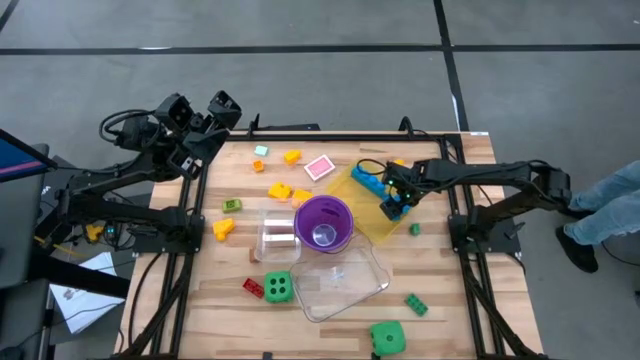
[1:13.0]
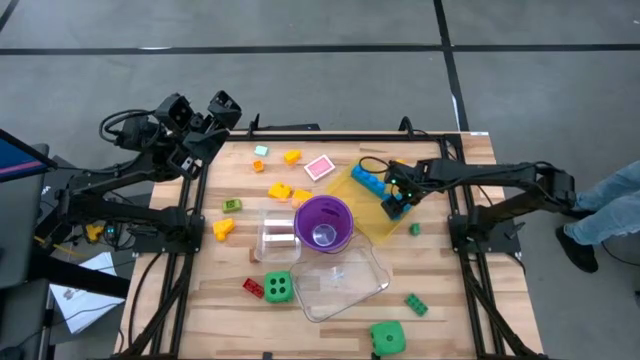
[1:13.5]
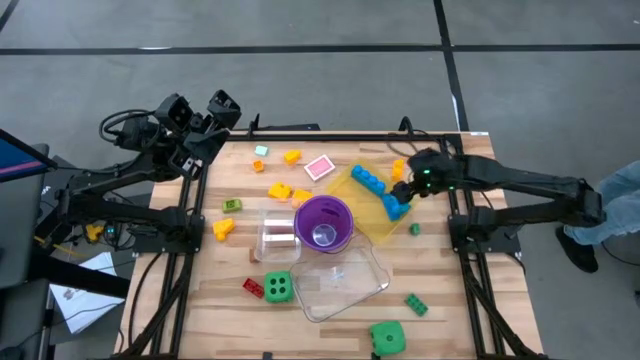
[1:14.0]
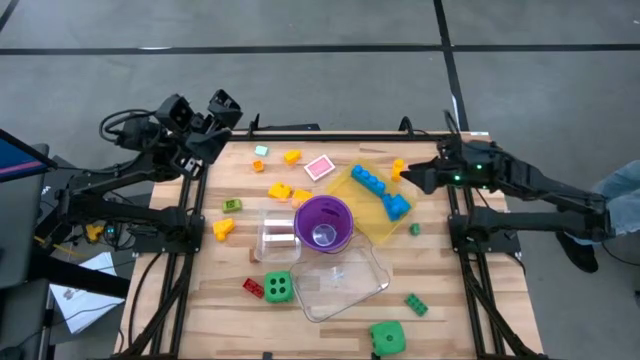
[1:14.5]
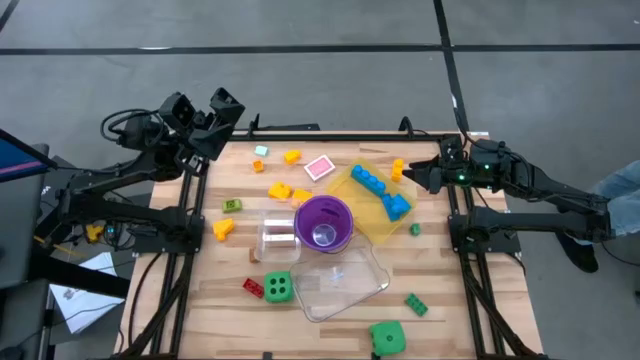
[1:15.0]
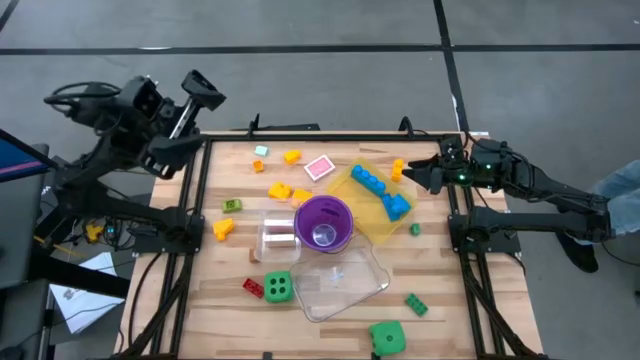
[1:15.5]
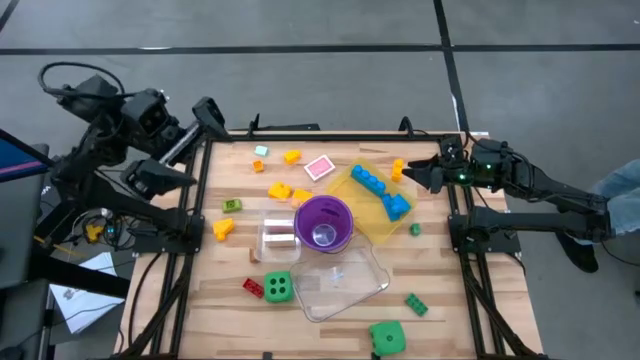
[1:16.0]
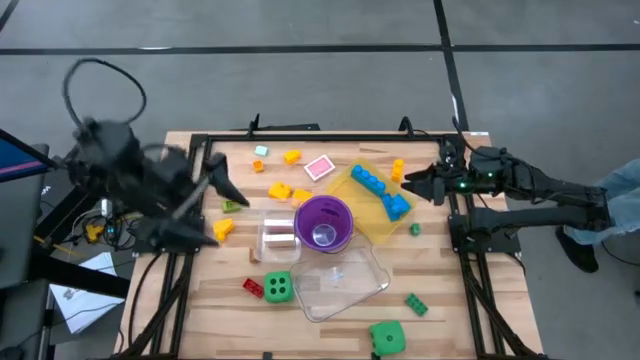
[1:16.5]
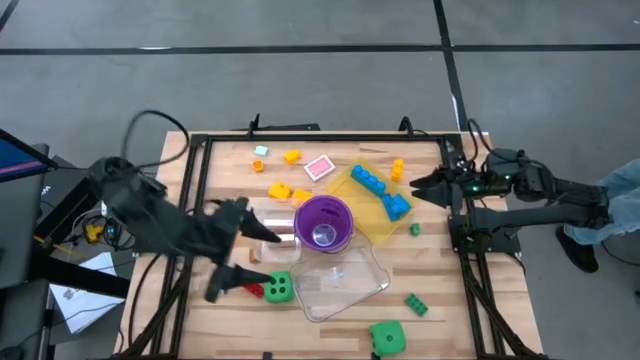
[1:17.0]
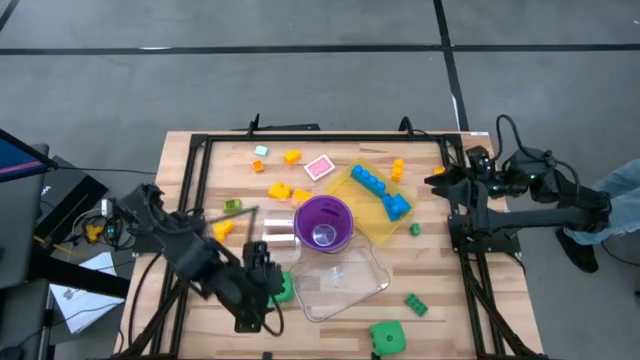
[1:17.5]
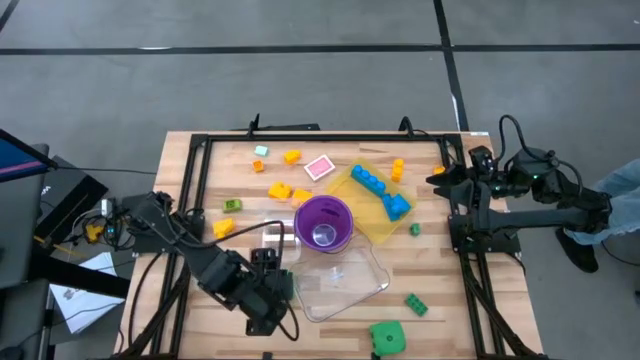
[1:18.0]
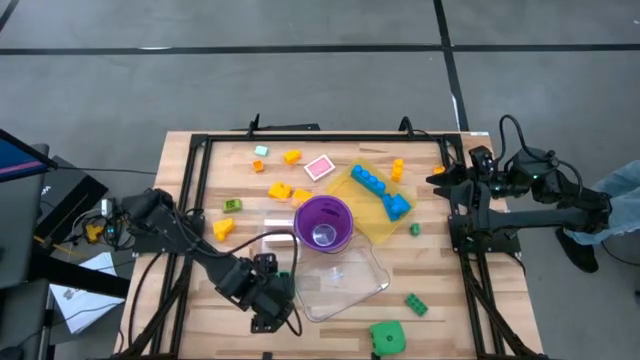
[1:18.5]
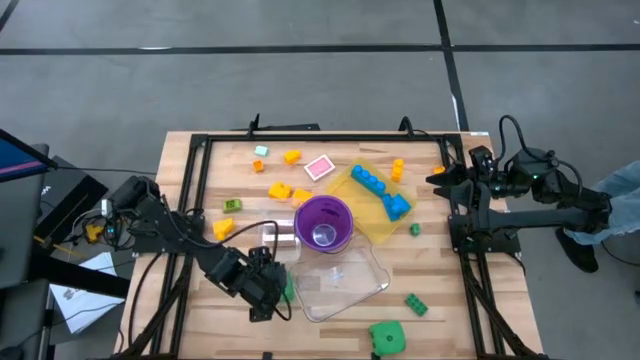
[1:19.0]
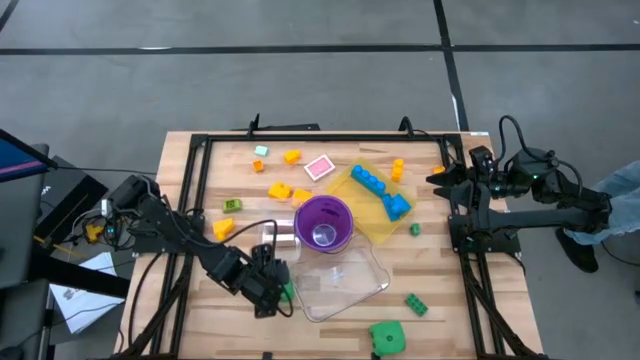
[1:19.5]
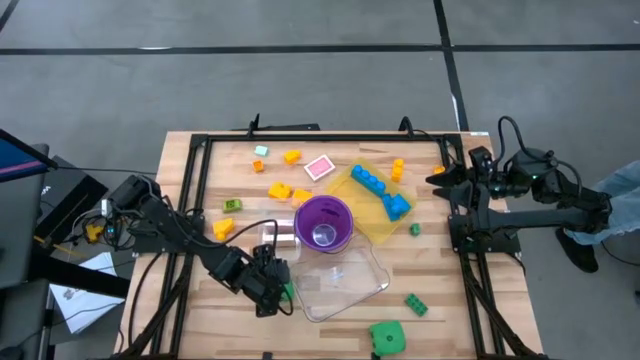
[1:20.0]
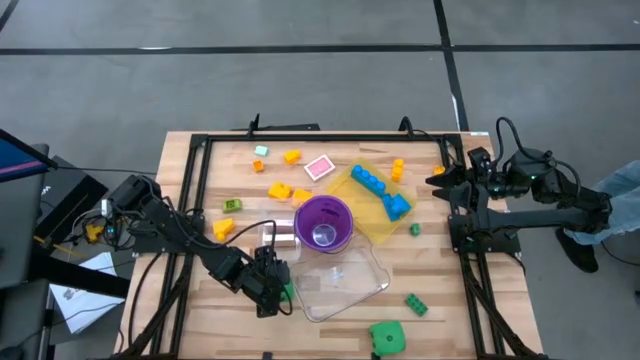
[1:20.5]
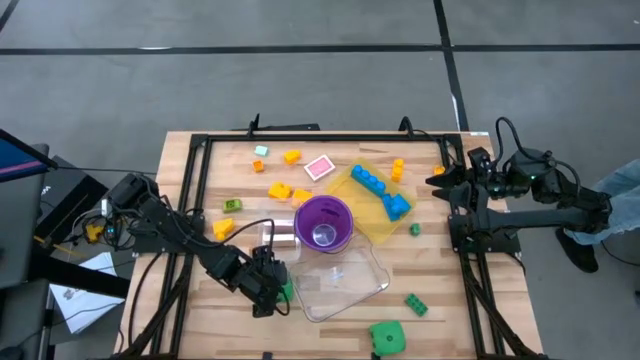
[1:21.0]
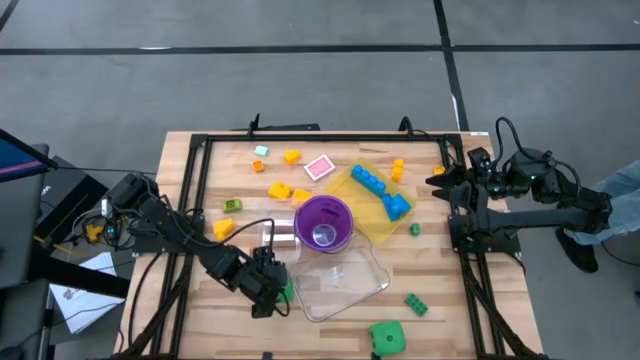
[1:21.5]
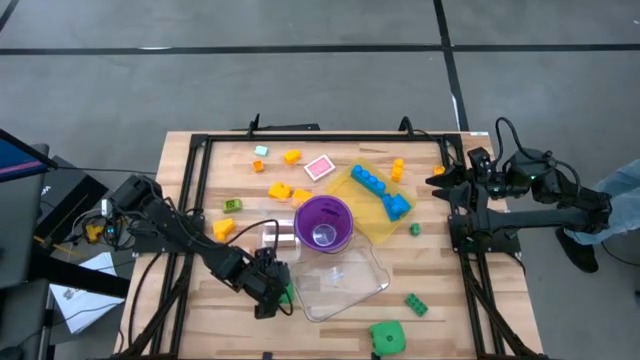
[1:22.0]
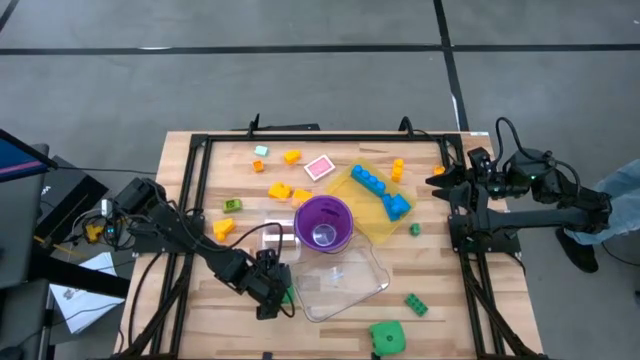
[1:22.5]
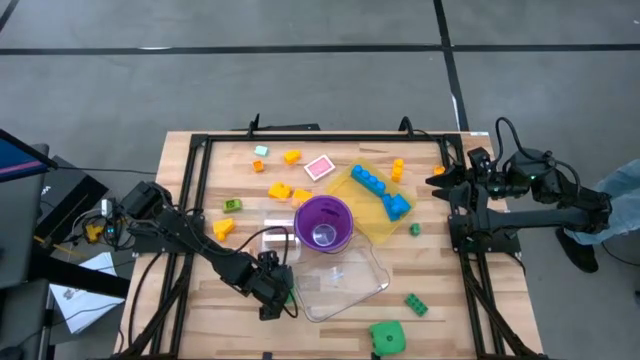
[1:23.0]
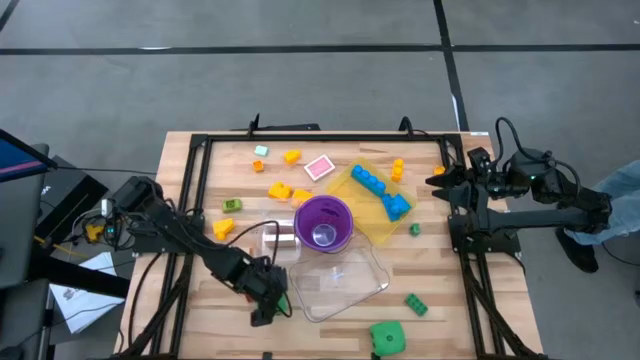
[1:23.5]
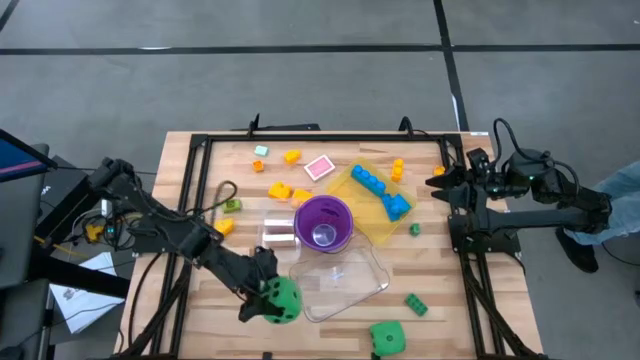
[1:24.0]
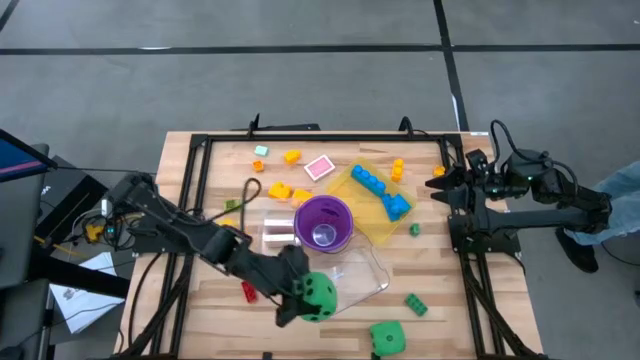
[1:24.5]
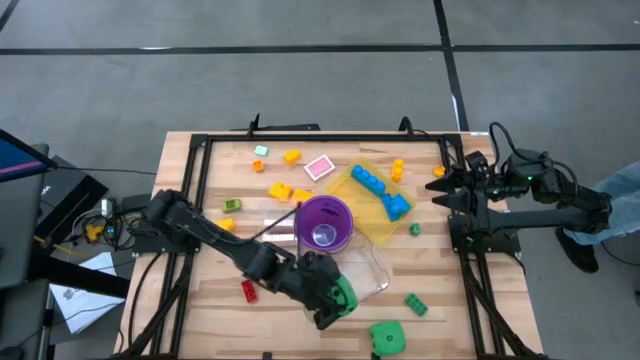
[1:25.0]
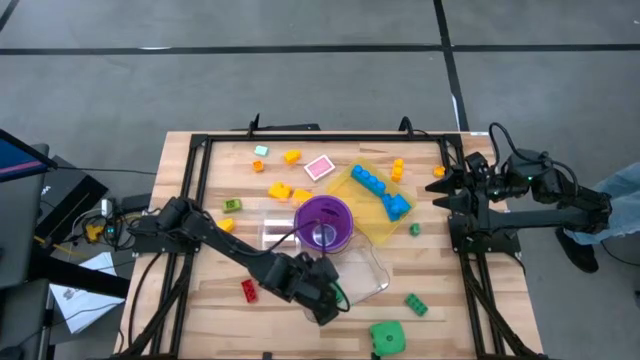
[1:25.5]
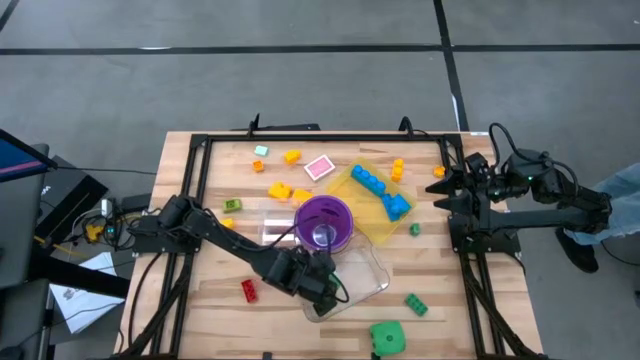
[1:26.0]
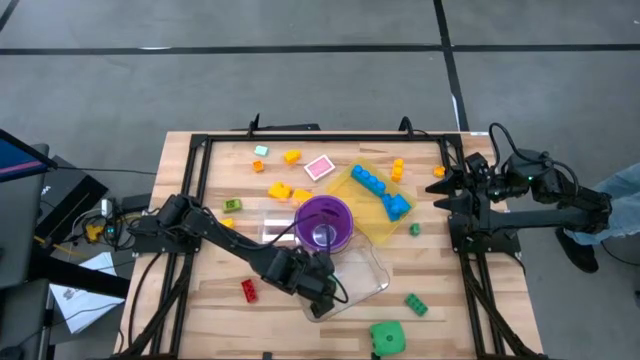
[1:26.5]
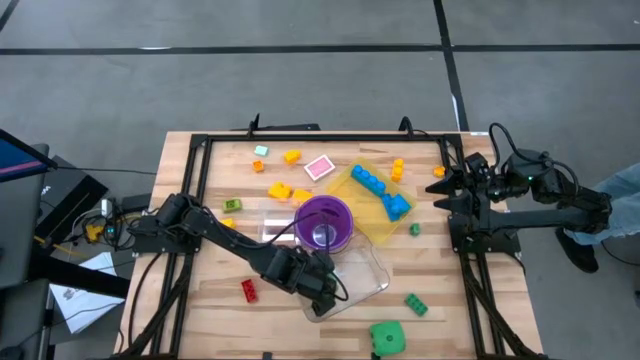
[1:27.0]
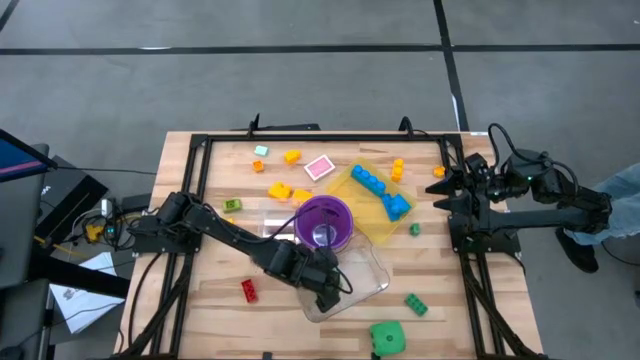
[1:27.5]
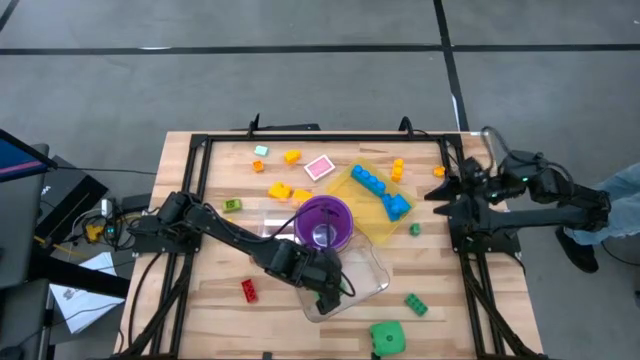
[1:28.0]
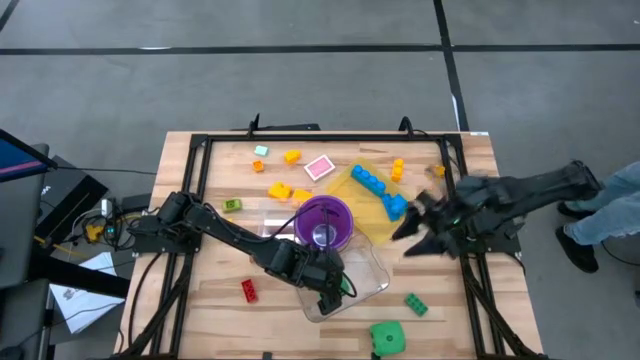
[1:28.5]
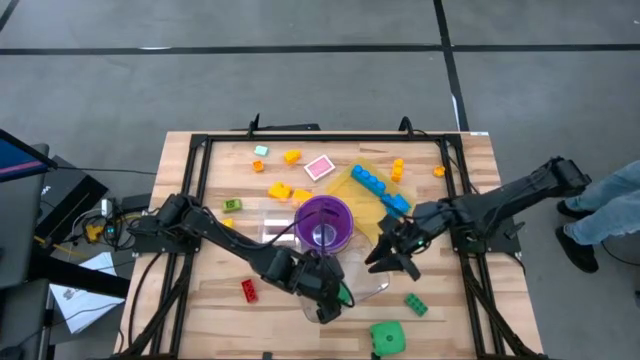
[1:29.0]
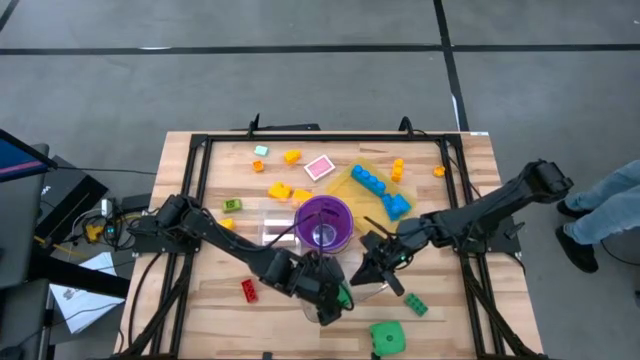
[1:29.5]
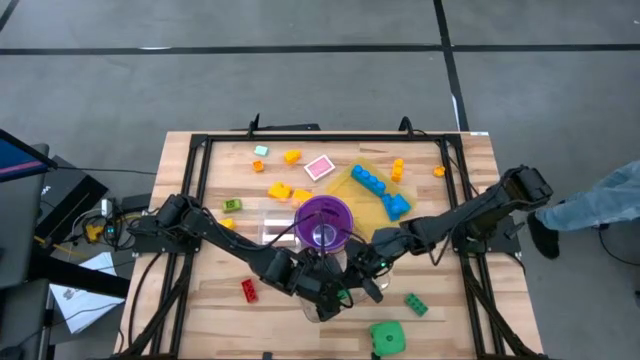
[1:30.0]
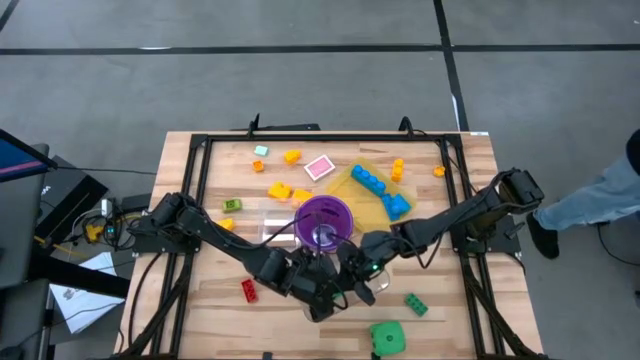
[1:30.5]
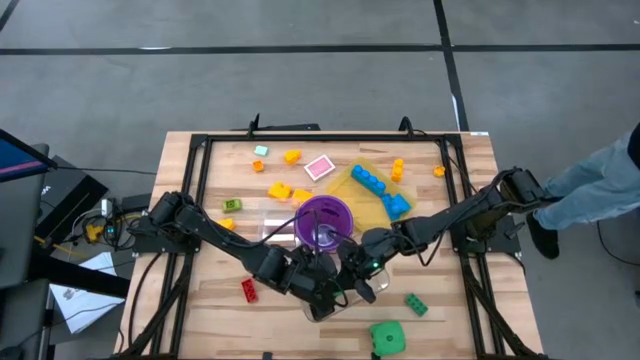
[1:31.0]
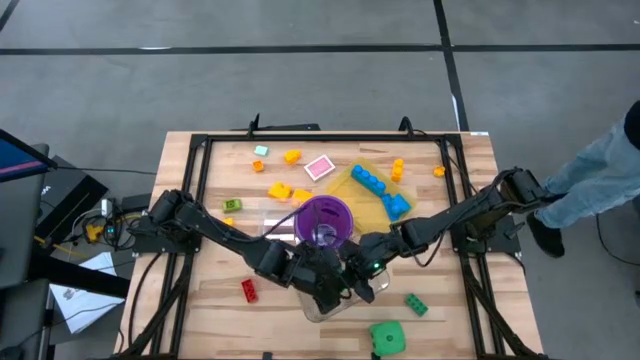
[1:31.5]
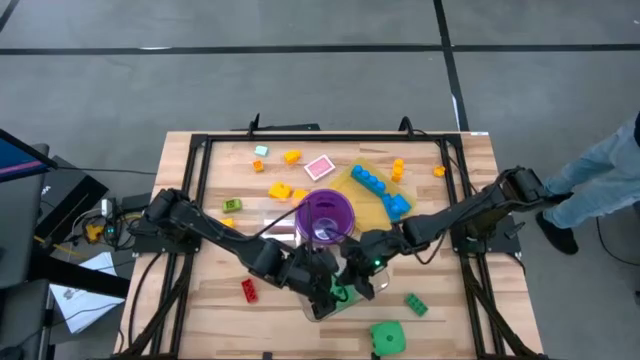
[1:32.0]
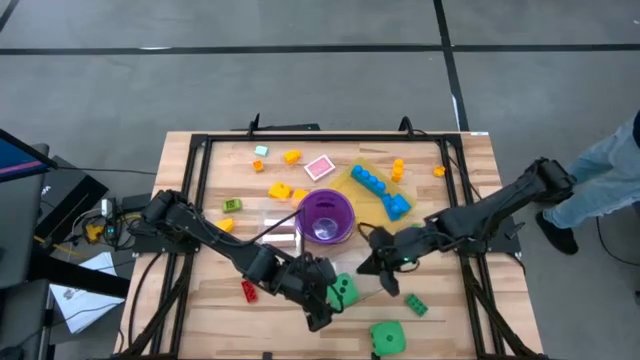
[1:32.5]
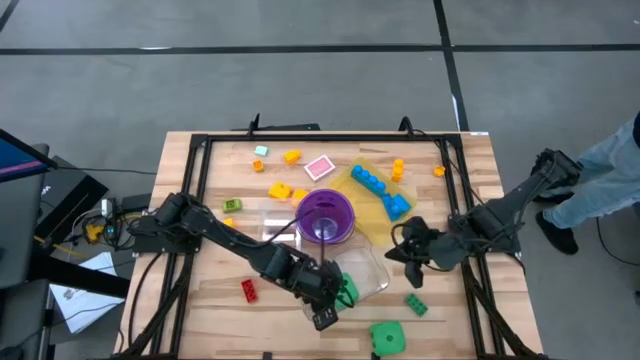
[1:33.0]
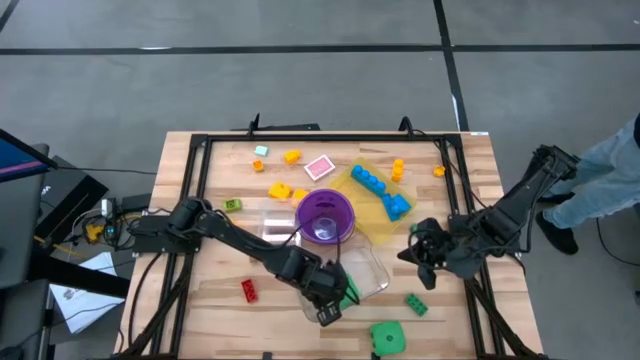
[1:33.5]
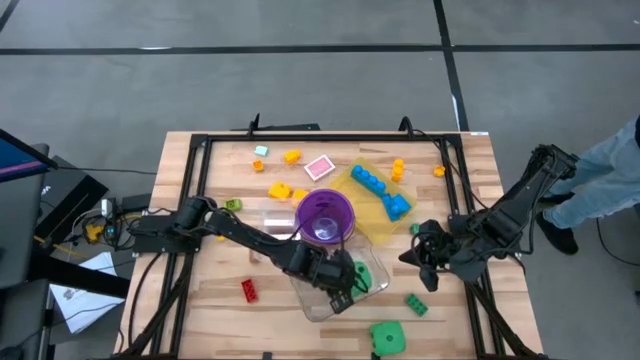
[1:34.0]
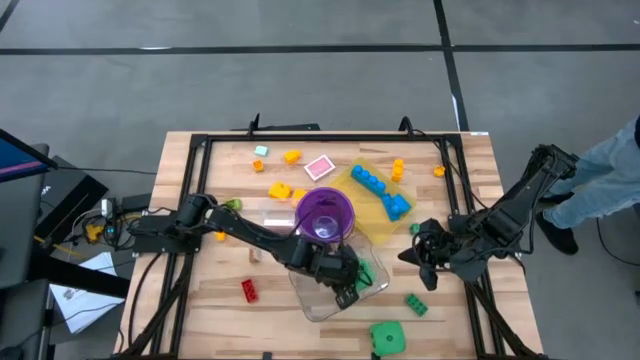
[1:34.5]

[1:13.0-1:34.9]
Task: Pick & Place Toys
Put the green dice into the transparent bin

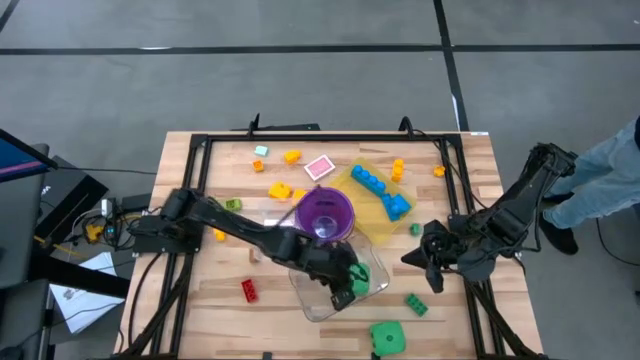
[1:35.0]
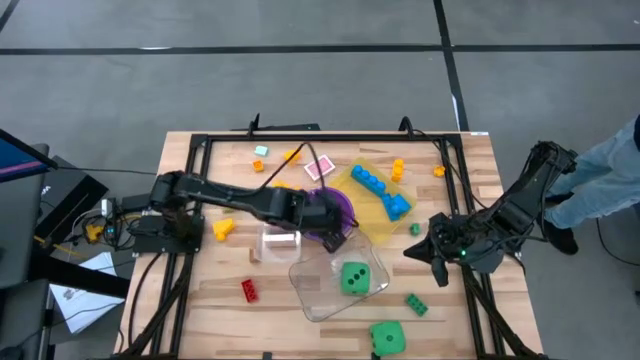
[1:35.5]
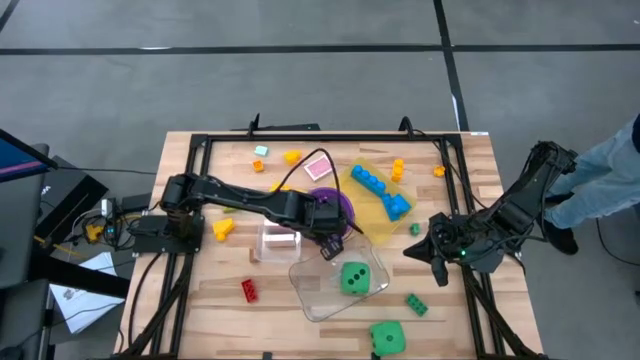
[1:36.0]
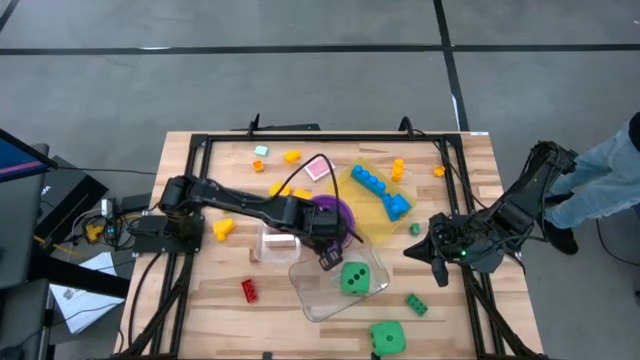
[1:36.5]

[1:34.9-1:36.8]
Adjust the purple bucket
